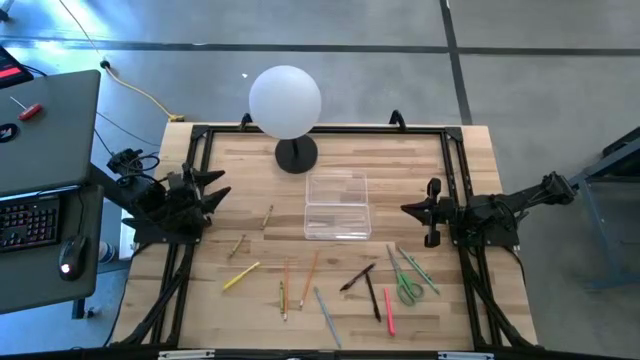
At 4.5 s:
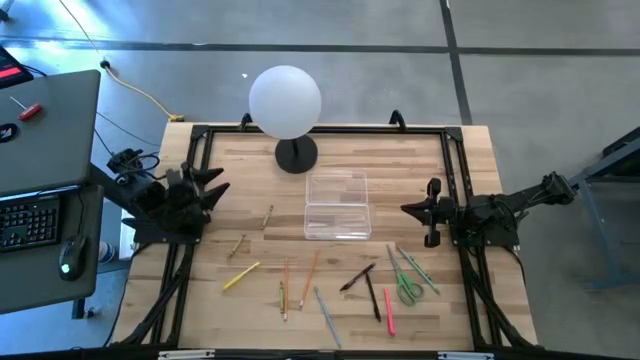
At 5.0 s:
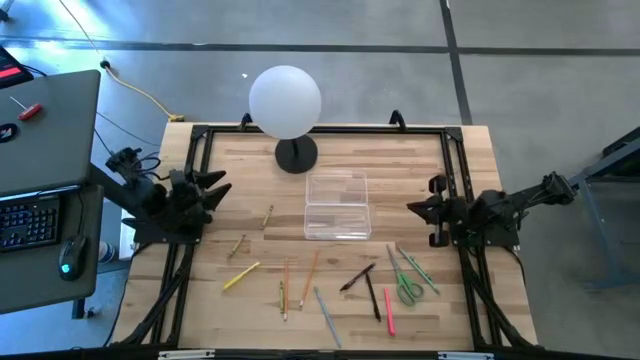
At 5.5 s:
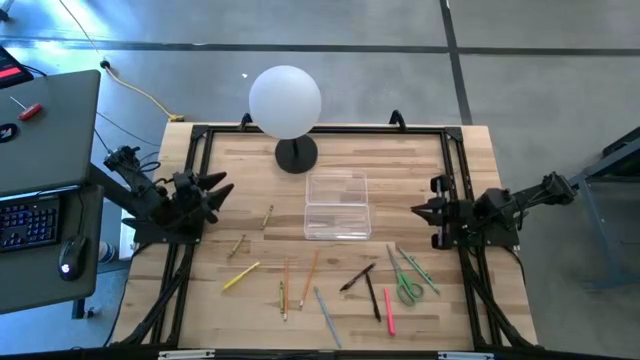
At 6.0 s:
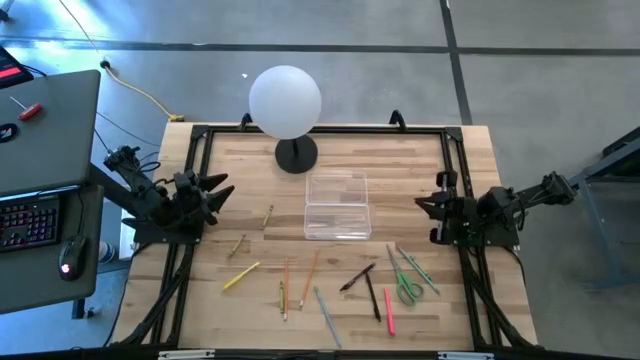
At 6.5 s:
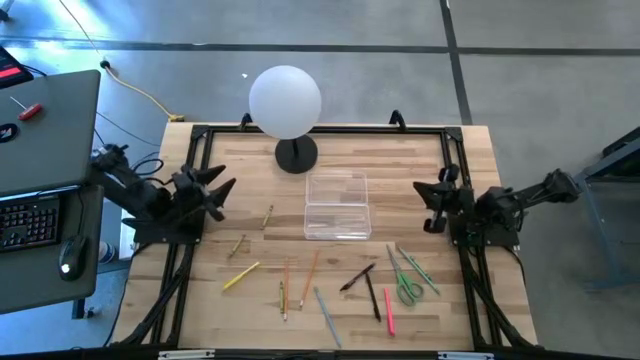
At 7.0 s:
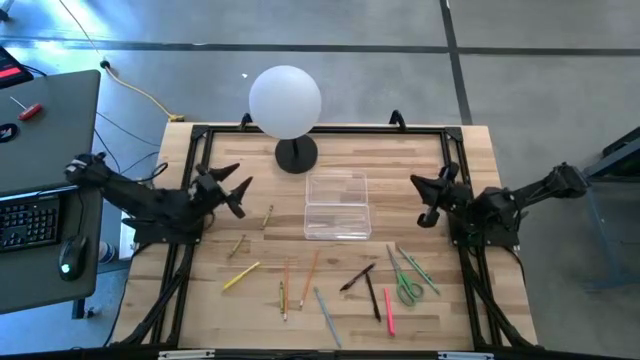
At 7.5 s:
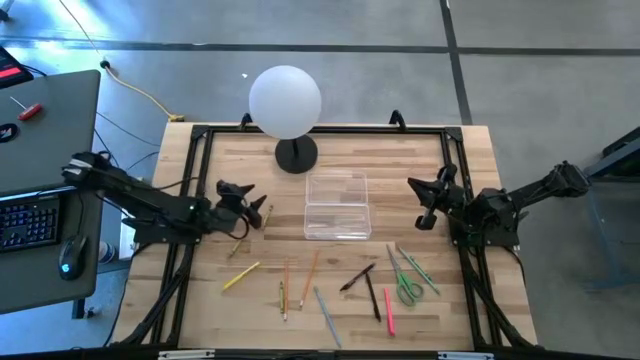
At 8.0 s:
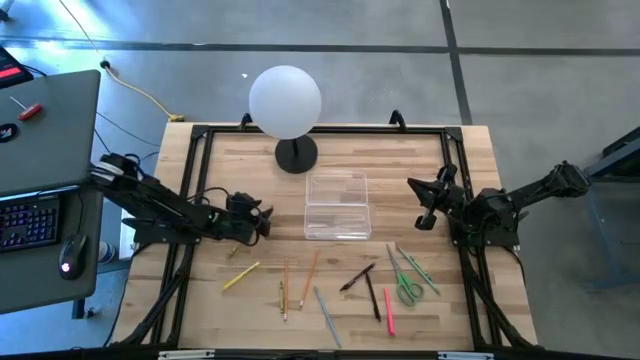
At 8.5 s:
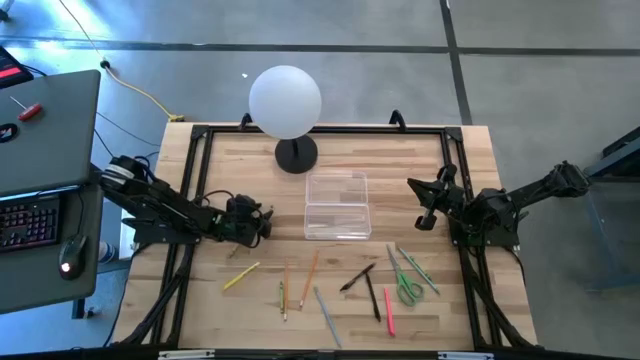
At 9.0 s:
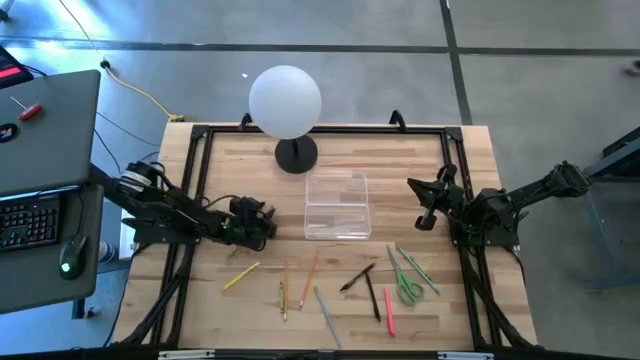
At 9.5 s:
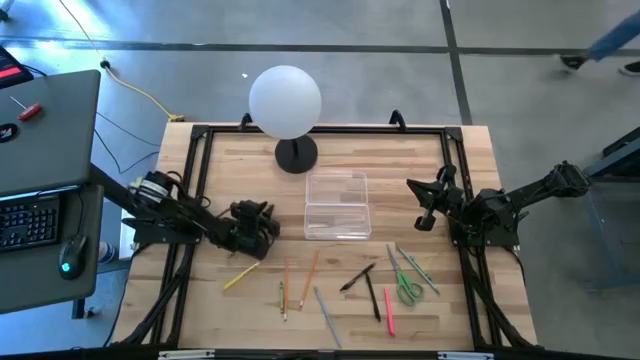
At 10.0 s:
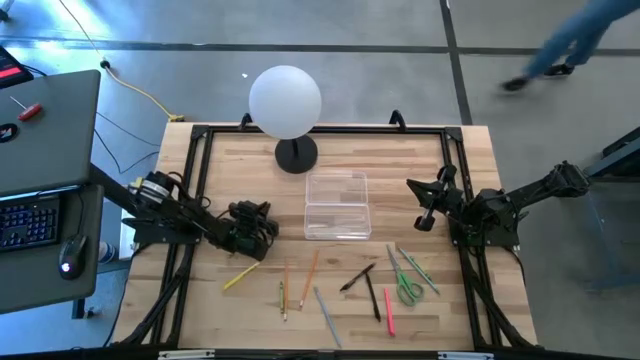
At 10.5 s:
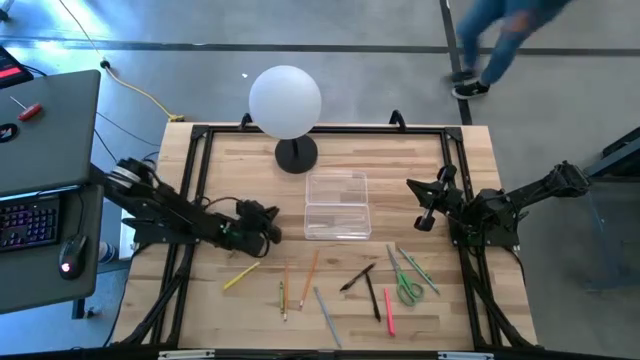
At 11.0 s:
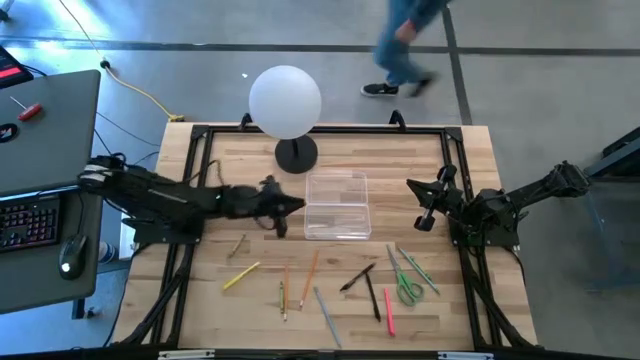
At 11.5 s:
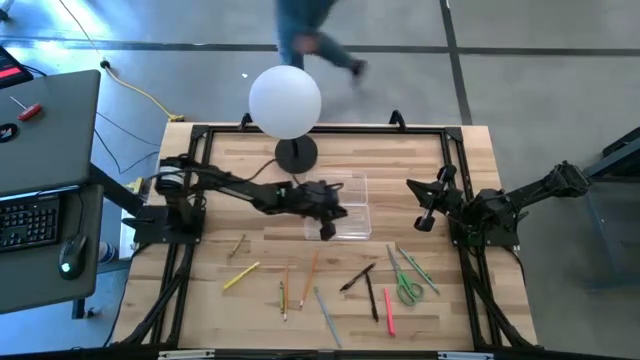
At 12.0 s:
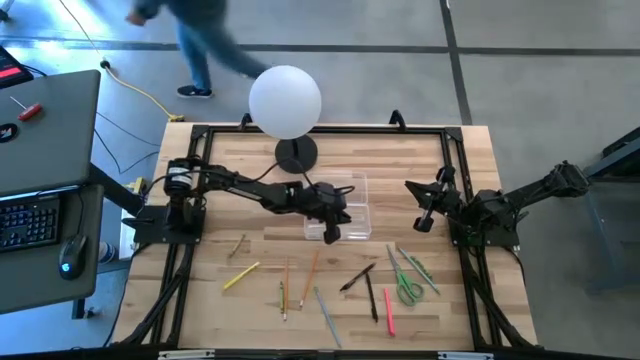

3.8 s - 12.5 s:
Task: Pick & place school supplies into a supply box
Put the green crayon into the transparent supply box

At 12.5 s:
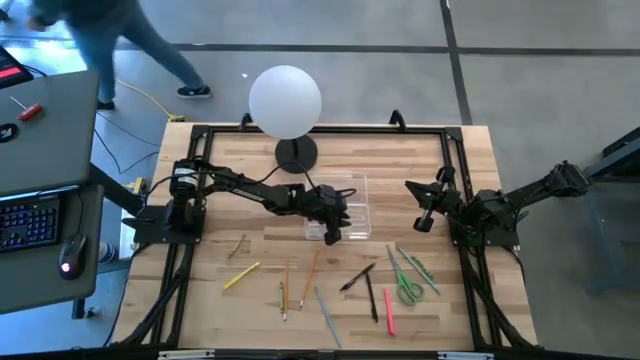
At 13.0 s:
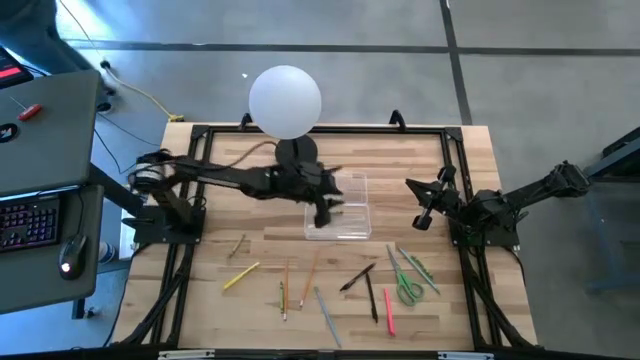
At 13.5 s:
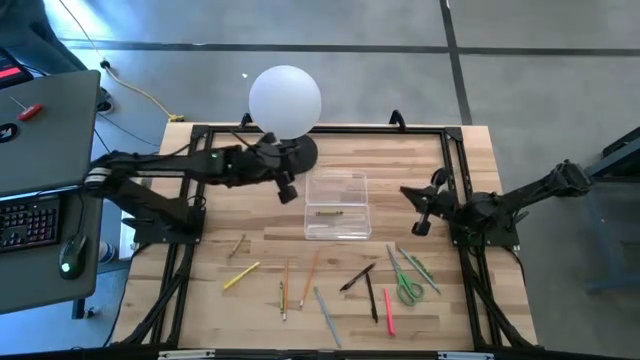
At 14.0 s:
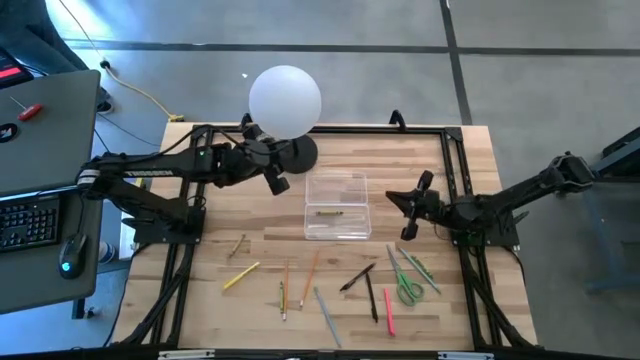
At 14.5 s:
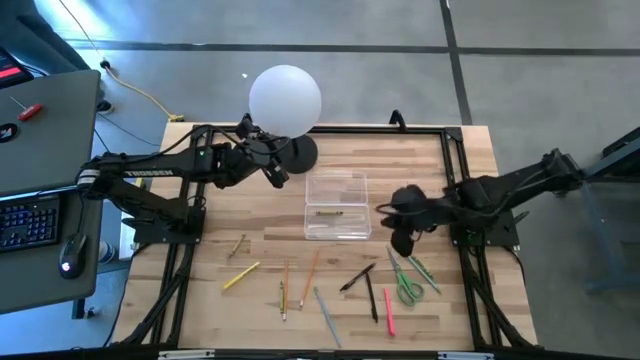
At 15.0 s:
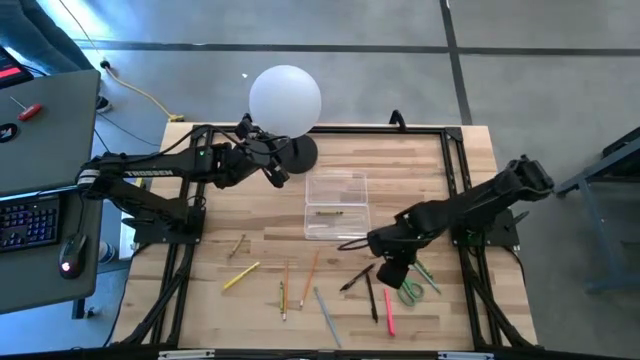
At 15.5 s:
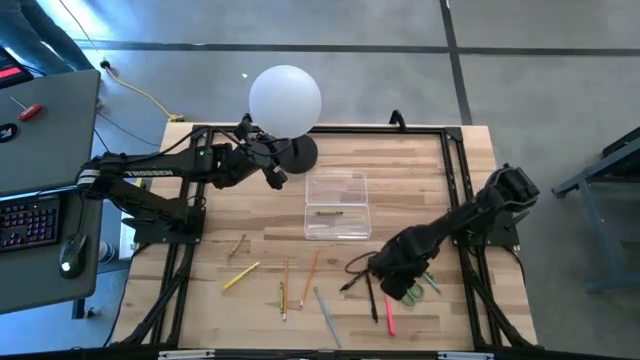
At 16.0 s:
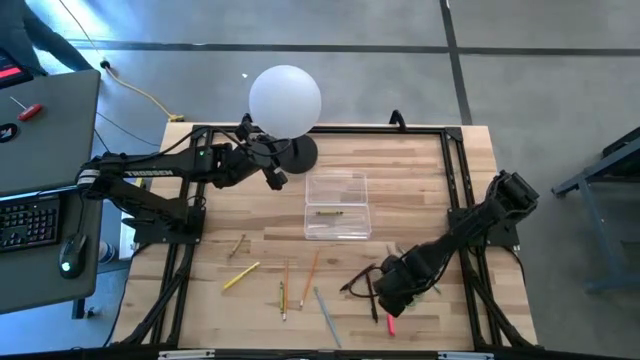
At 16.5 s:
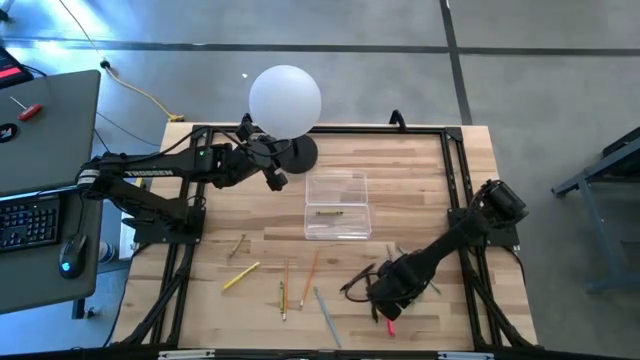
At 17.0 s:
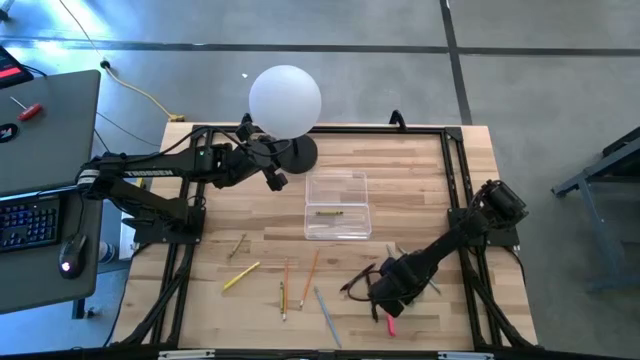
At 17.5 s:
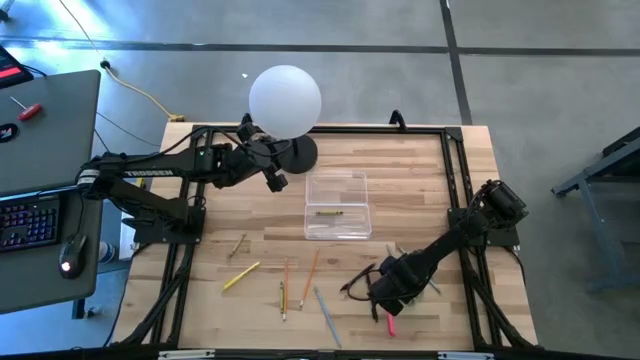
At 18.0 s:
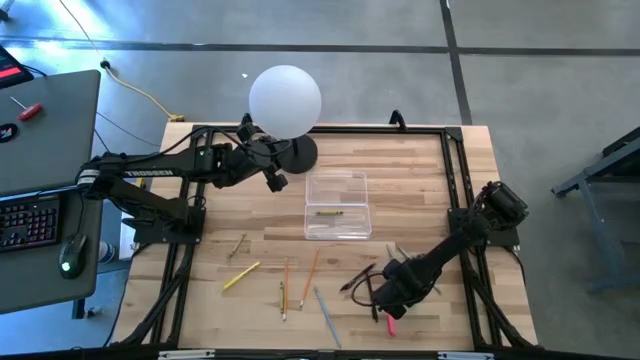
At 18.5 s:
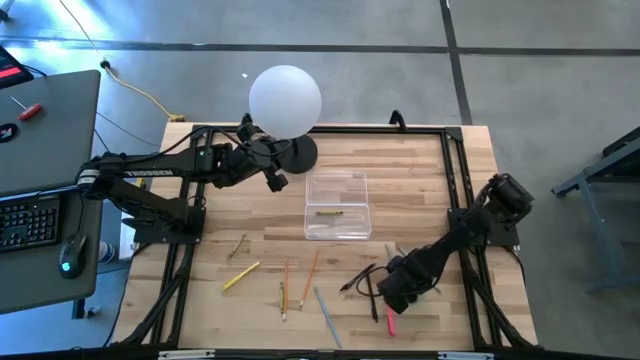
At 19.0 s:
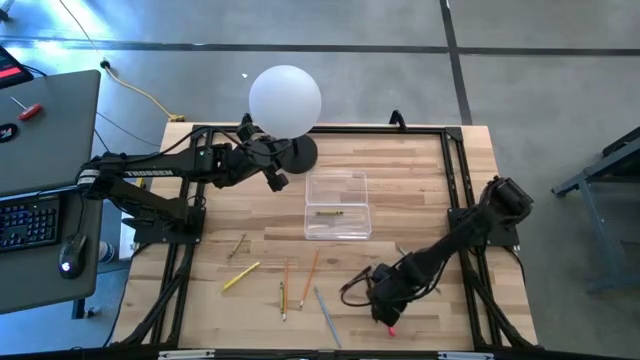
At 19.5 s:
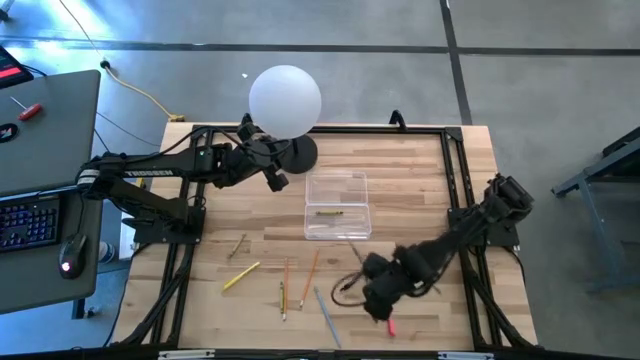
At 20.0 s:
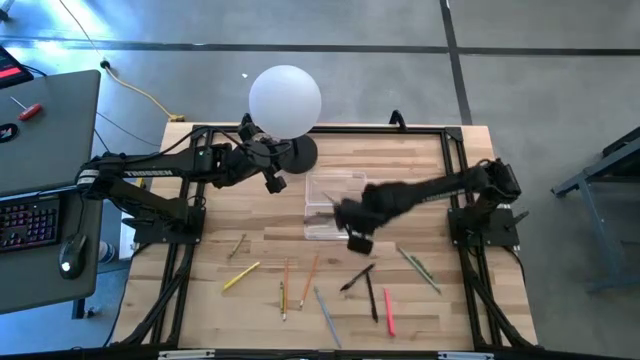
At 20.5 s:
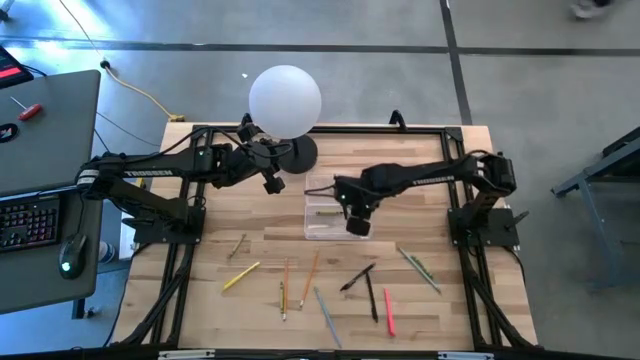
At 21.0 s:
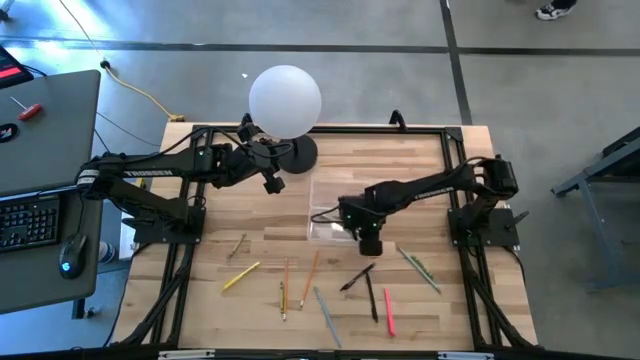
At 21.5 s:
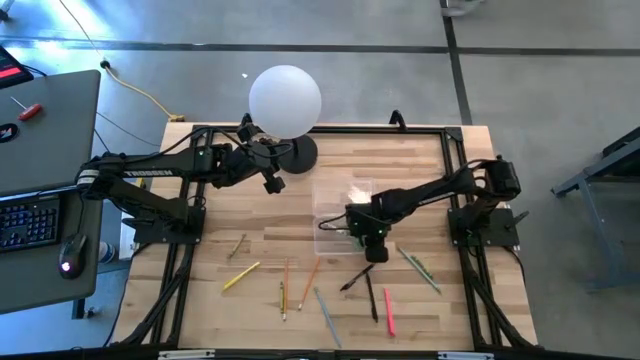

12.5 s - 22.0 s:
Put the green scissors into the transparent supply box

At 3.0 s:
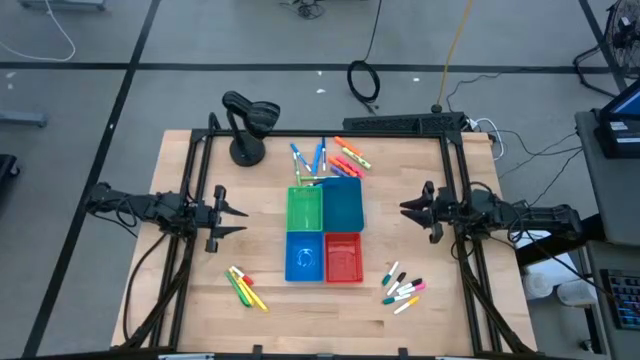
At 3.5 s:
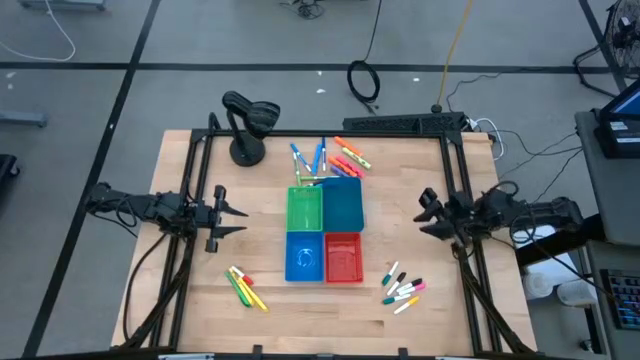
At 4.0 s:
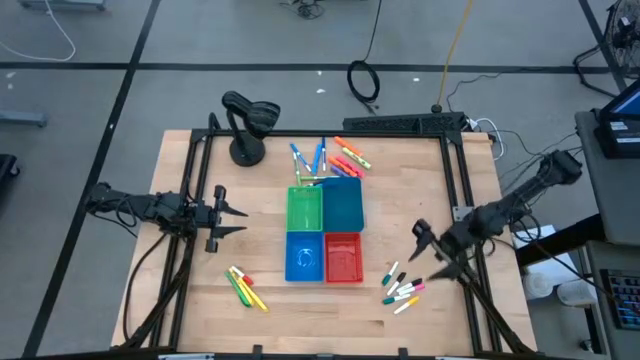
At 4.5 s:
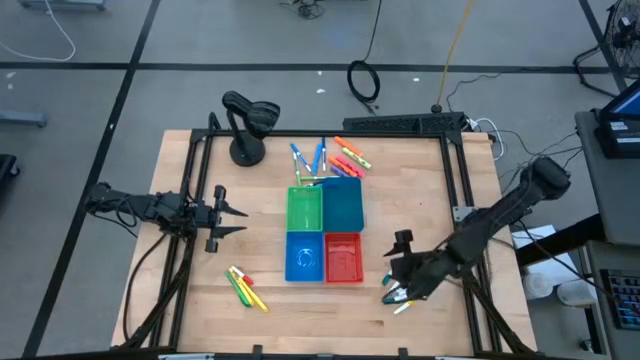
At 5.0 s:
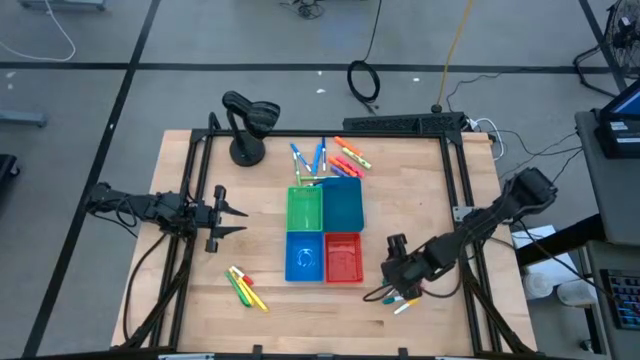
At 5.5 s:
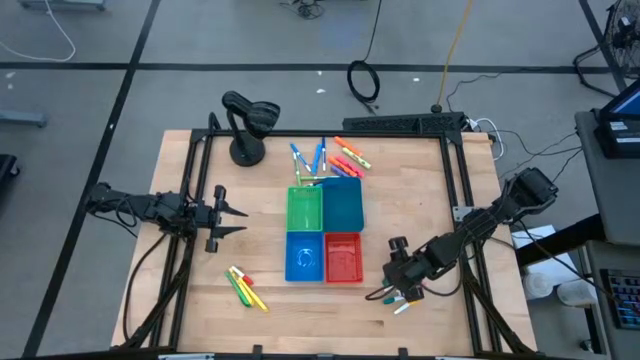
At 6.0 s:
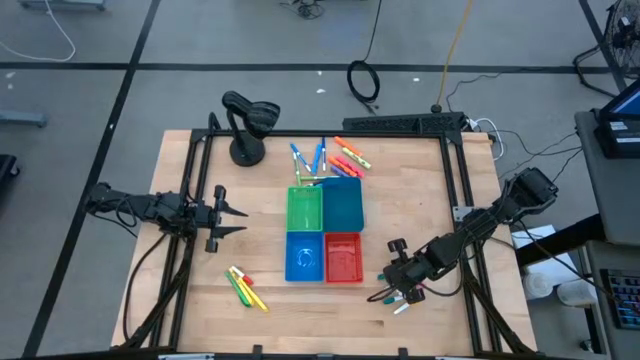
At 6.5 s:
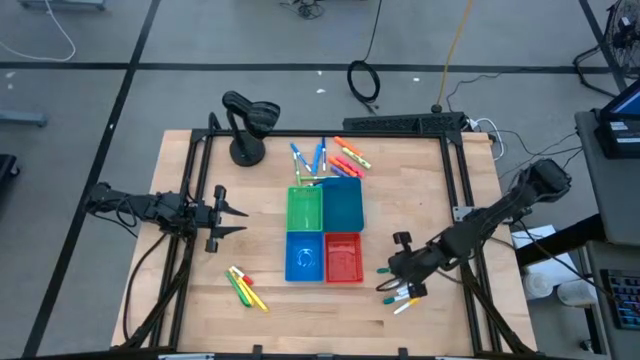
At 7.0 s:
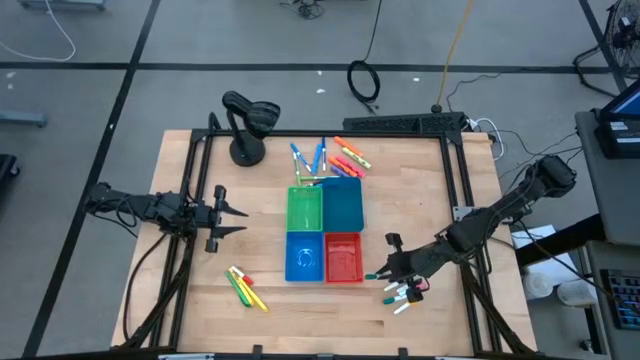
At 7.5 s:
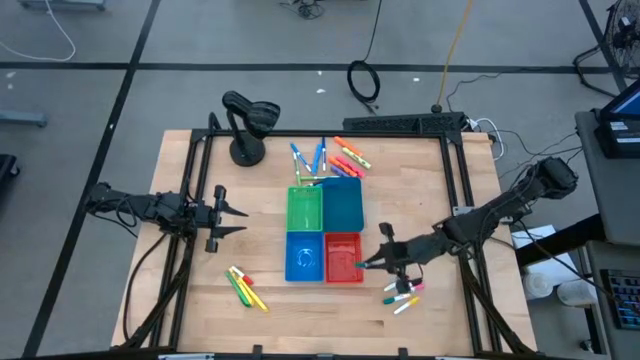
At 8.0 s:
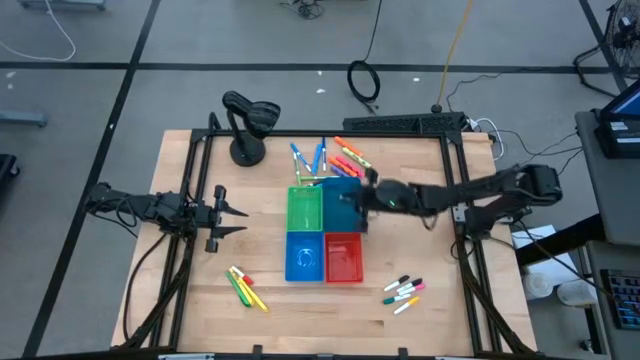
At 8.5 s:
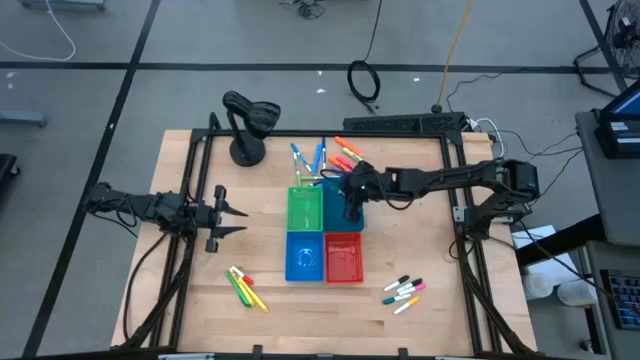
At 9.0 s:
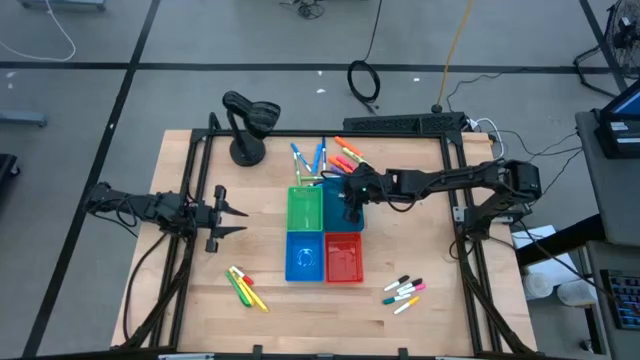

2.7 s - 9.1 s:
Task: Pick & Place Markers
Put the green highlighter pen into the blue bin
